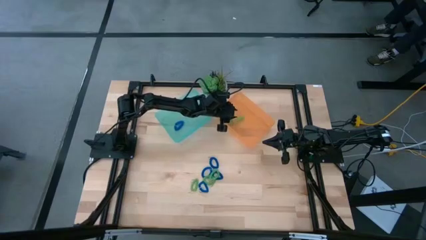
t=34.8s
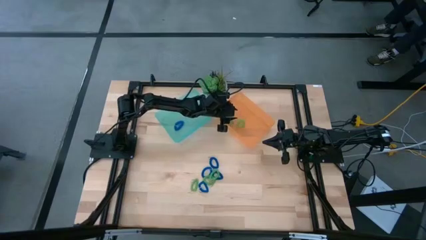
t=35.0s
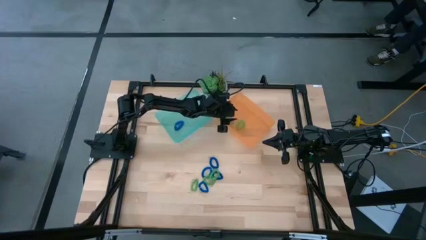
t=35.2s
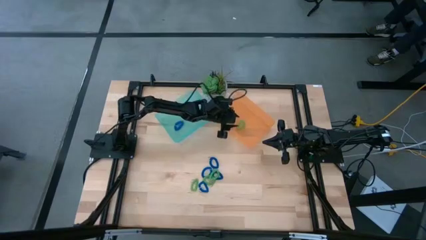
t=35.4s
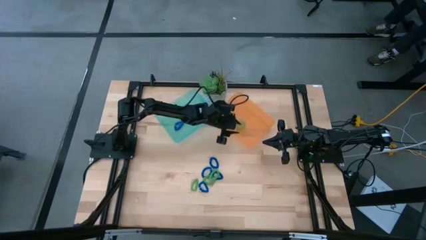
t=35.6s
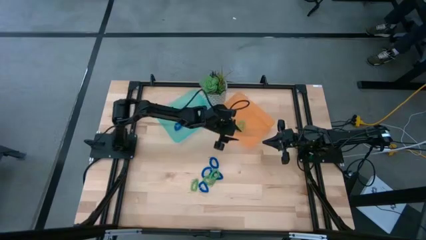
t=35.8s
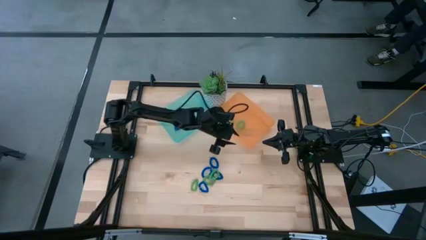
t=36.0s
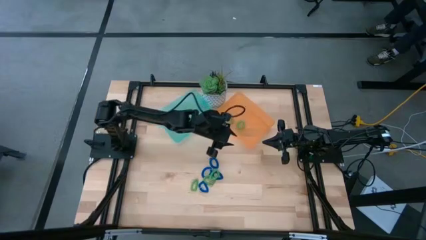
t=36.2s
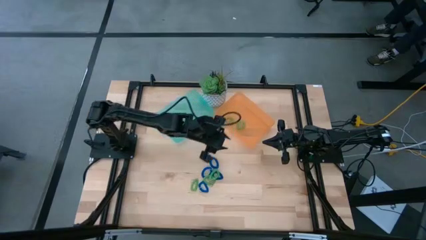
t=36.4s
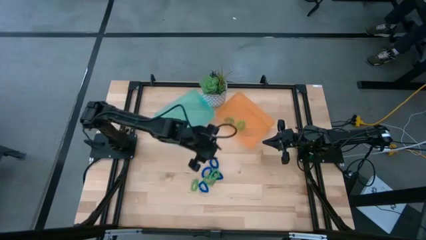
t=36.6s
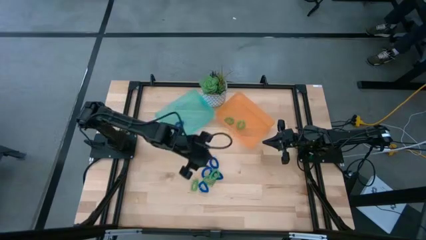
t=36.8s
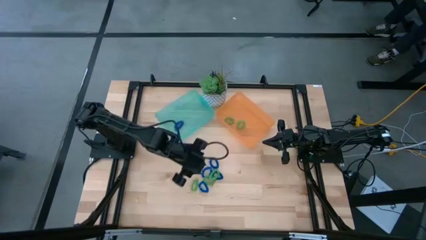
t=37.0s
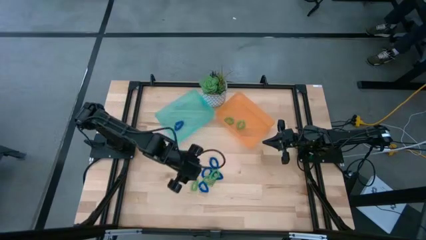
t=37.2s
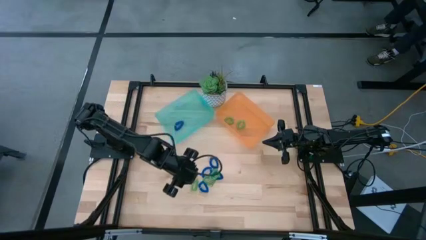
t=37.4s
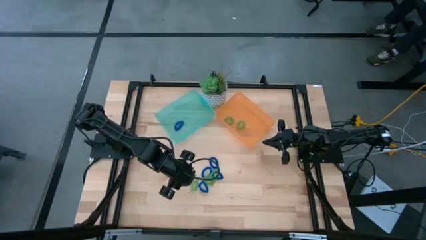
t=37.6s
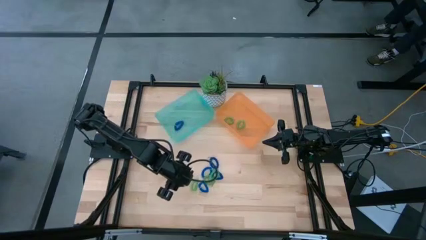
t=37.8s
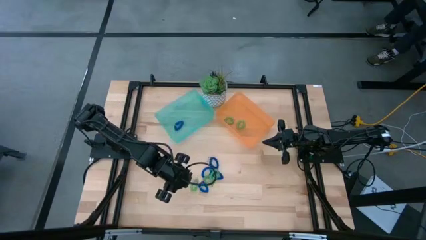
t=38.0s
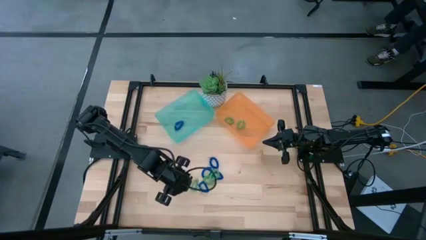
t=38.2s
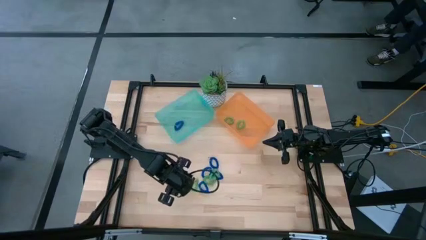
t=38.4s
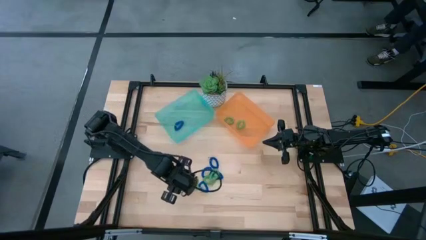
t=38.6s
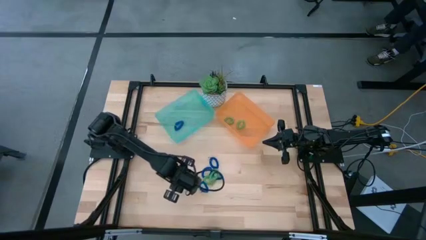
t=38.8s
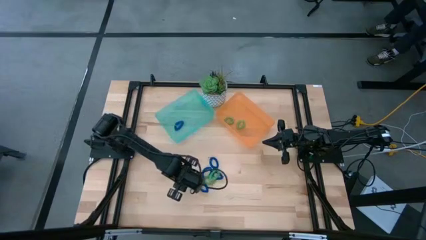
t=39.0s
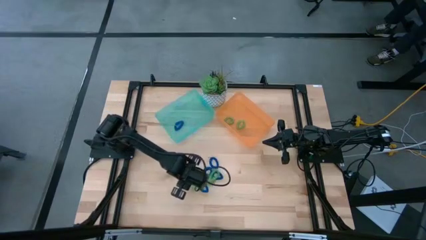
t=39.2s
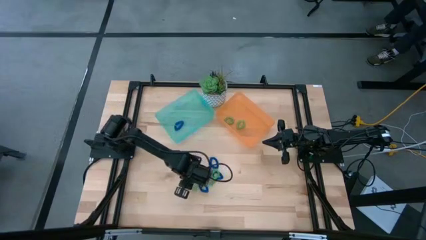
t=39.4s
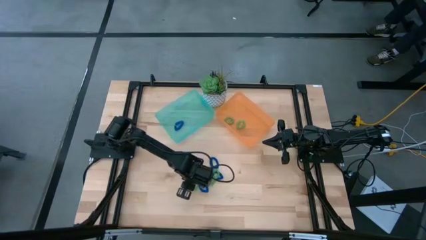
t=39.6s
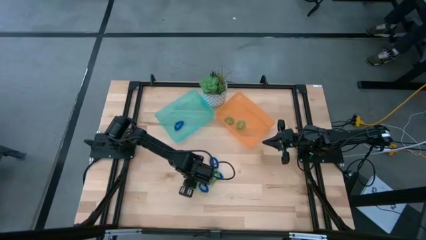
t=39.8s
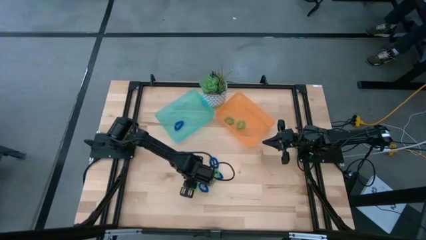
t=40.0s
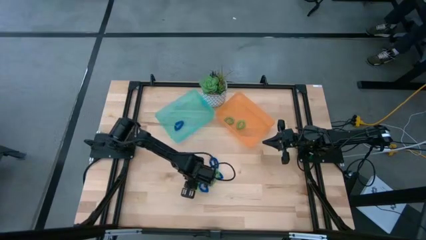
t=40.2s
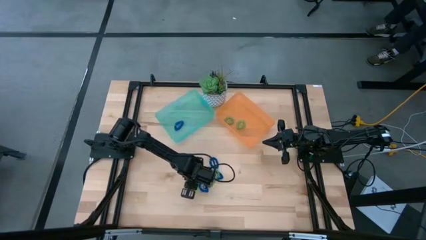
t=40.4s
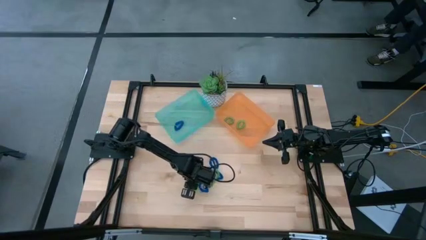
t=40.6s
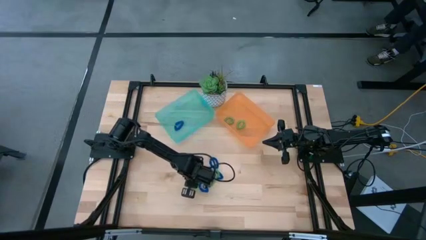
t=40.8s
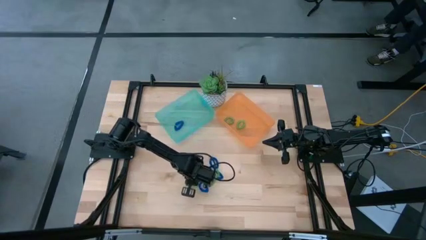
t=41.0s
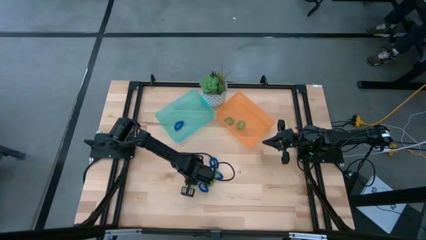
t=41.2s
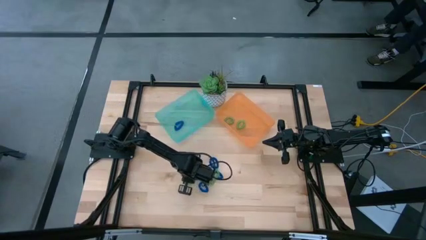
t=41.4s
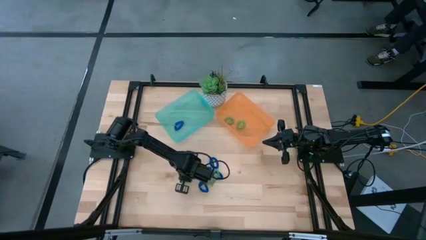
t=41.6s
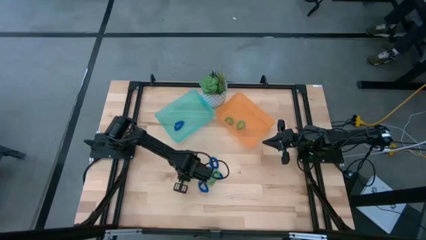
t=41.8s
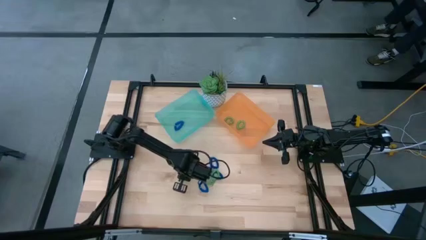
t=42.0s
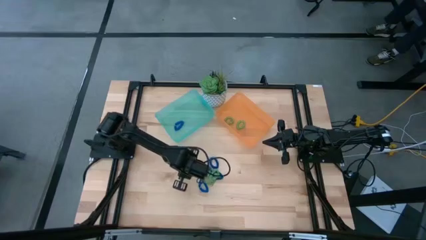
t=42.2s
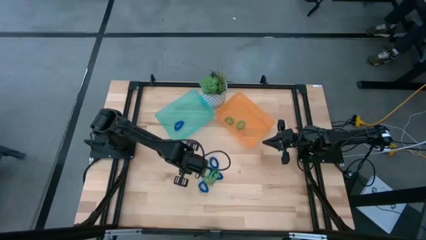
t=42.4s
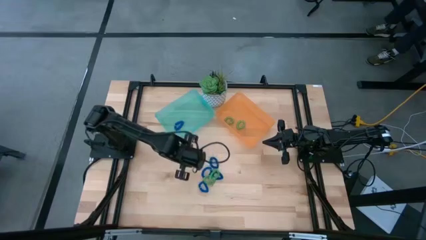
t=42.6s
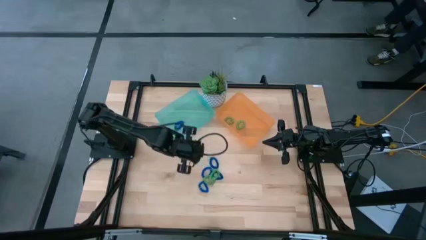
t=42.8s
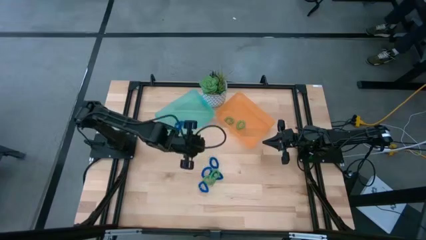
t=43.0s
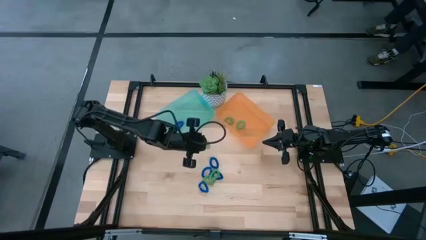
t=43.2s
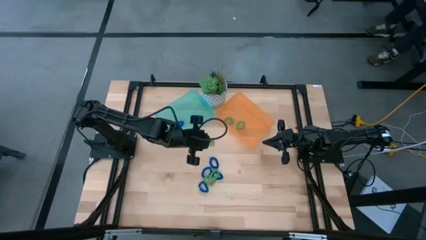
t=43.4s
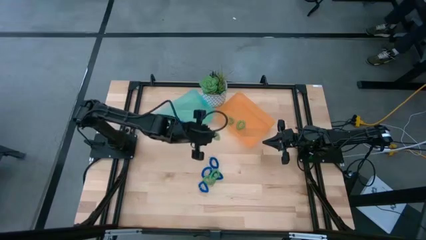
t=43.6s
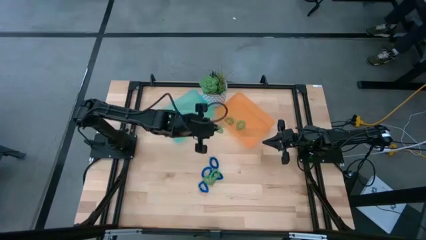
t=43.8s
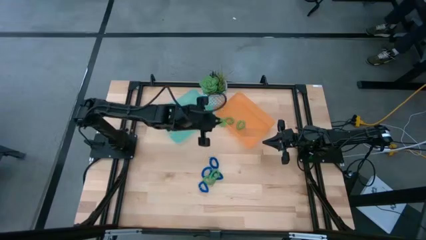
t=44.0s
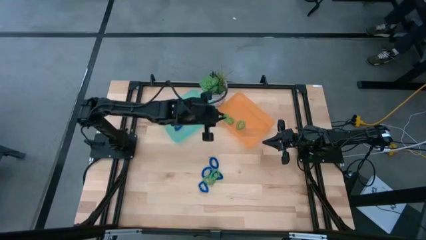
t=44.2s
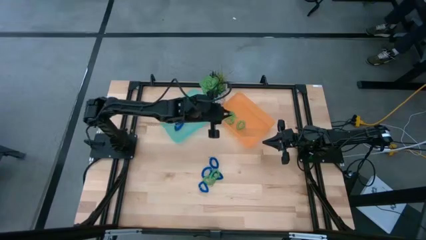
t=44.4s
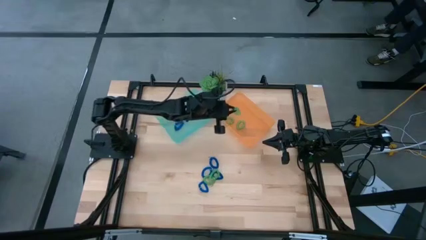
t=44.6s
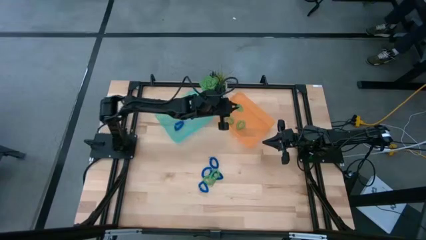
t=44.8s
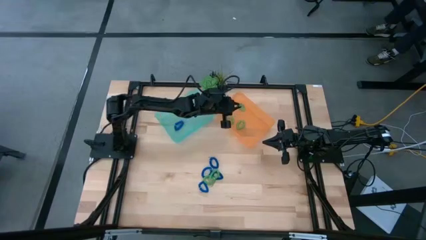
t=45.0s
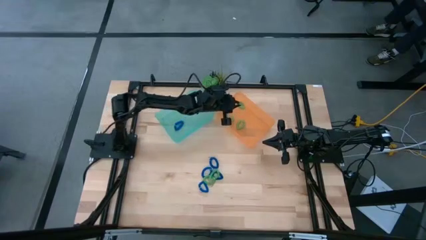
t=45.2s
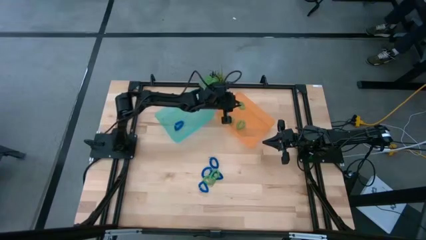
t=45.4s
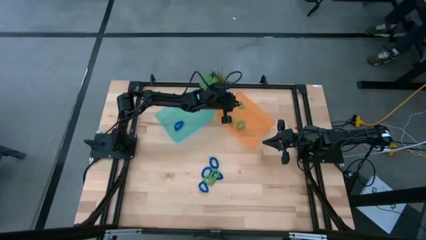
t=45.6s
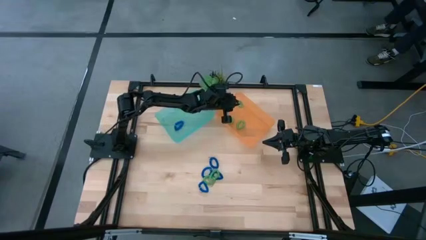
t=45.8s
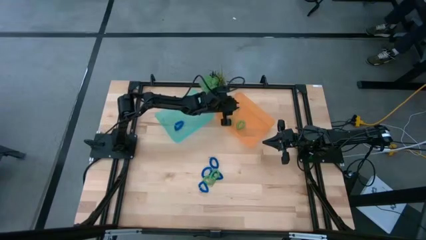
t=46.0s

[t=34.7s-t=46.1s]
Task: Sort spring keychains
Put the green spring keychain into the orange bin

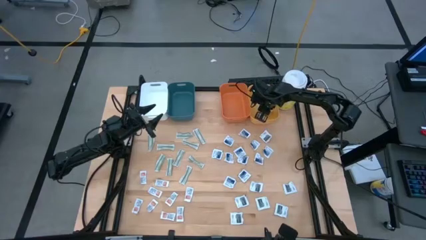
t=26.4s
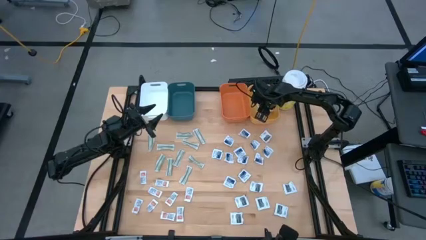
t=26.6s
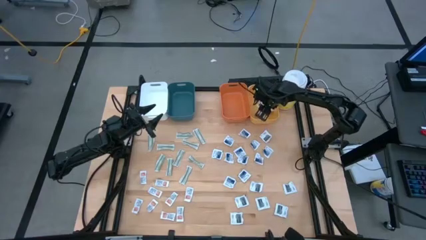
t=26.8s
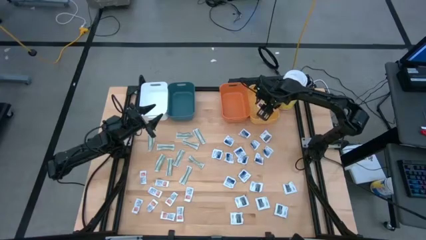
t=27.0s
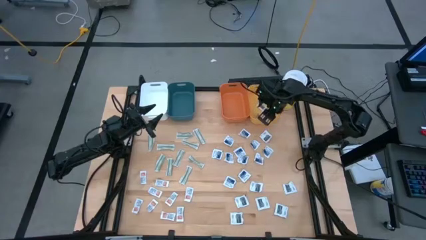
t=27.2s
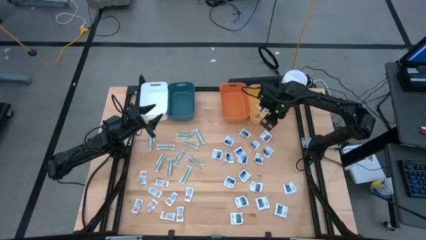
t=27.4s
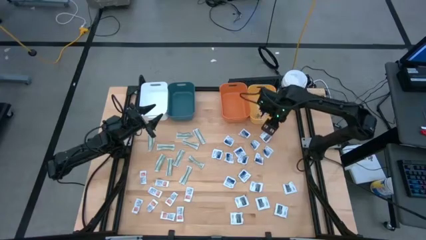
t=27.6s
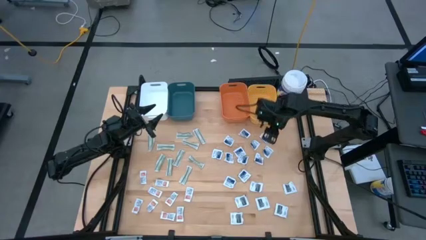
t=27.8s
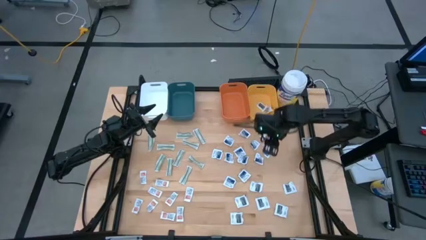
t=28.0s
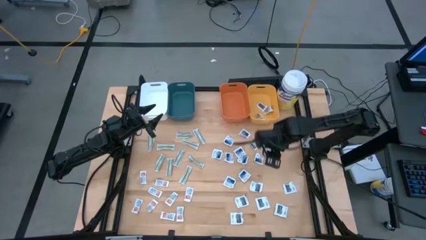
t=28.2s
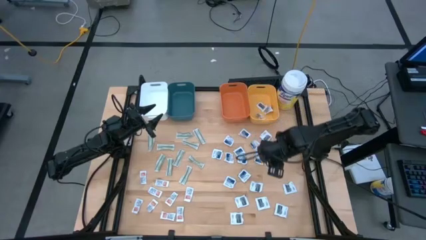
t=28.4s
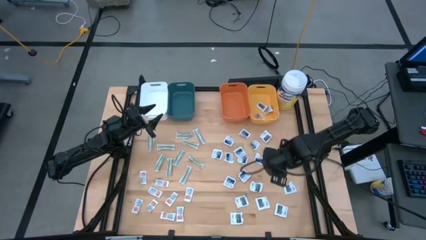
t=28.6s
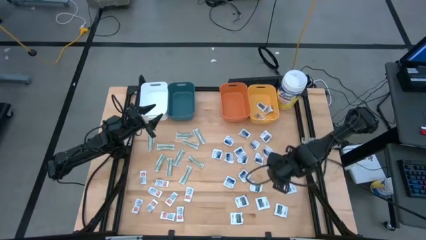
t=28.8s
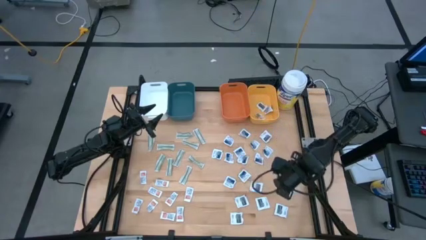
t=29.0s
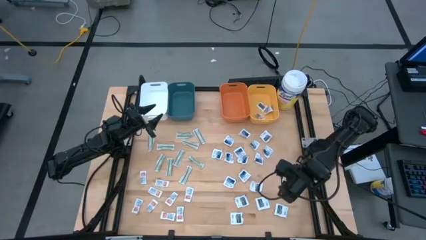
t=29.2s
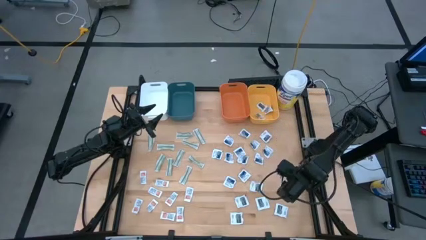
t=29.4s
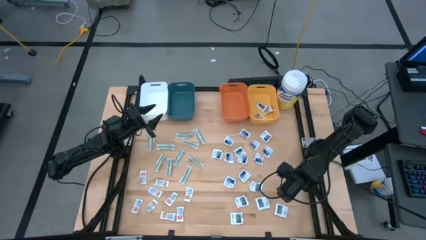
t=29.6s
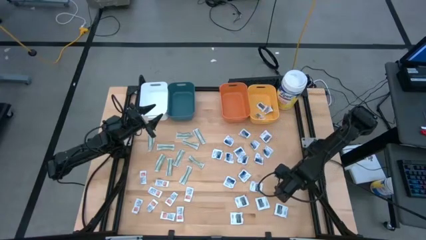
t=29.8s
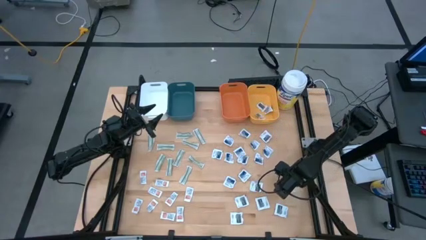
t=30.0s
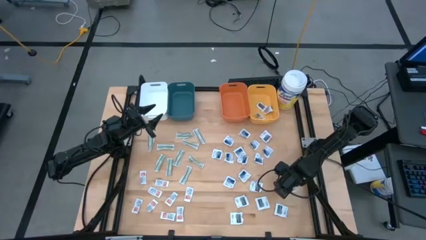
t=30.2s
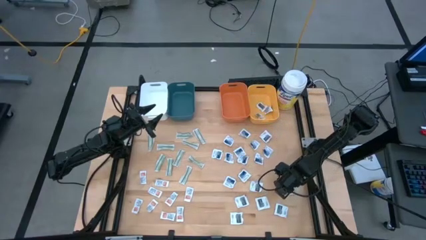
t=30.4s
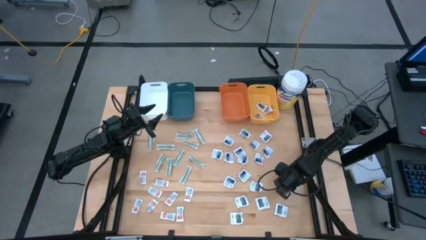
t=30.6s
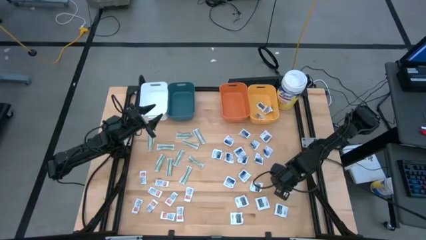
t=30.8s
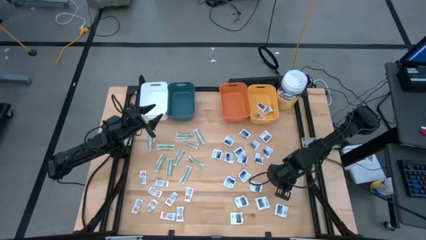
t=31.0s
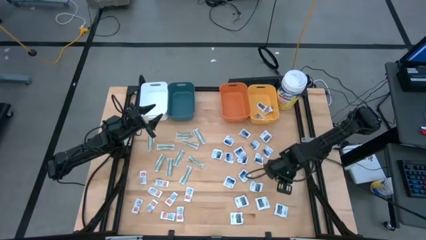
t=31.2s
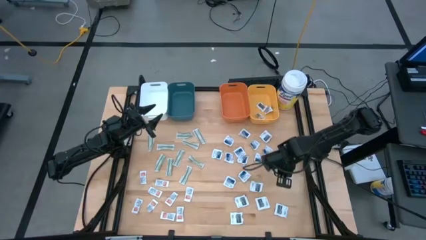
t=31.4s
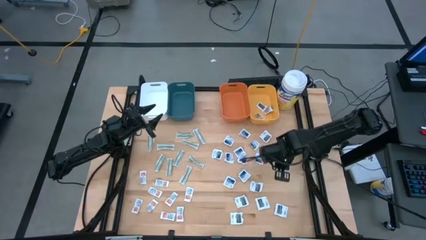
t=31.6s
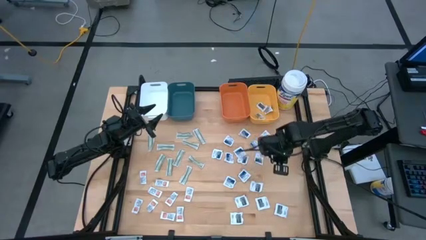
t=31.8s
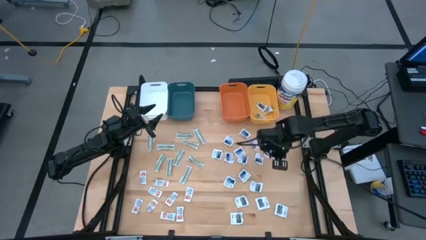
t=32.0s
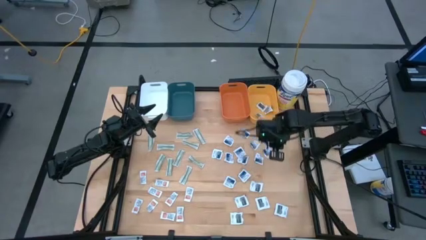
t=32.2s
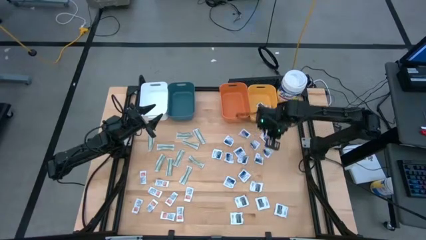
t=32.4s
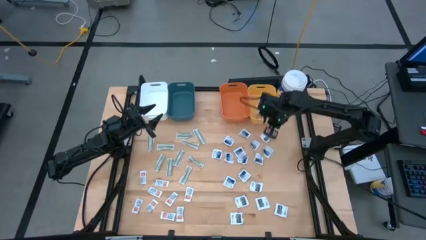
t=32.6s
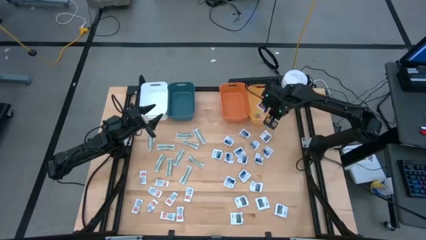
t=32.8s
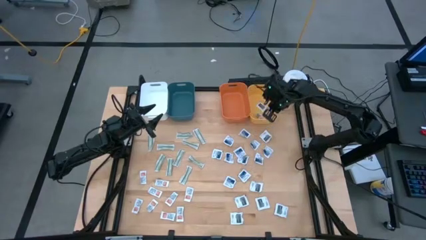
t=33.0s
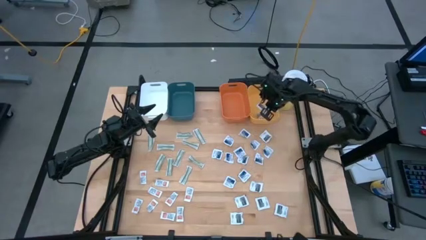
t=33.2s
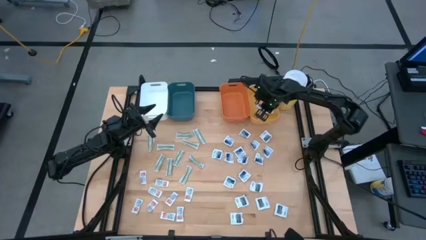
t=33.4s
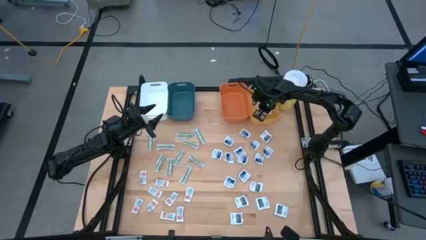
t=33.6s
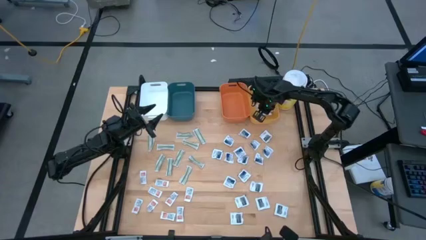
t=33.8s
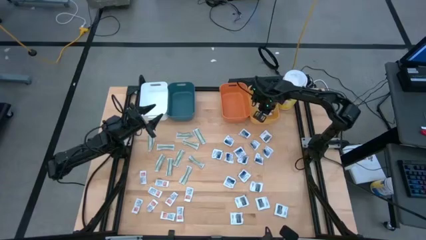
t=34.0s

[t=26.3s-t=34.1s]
Task: Pick & Place First Aid Supplies
Put the towelette pack into the yellow bin
